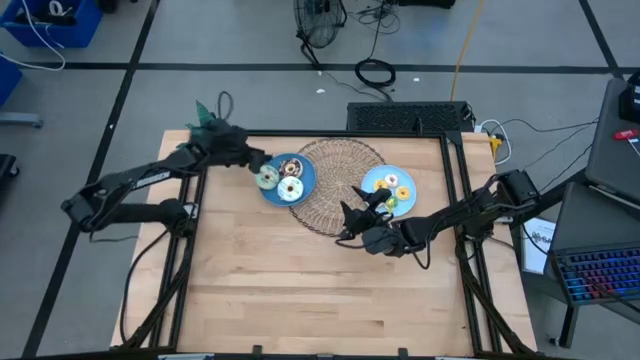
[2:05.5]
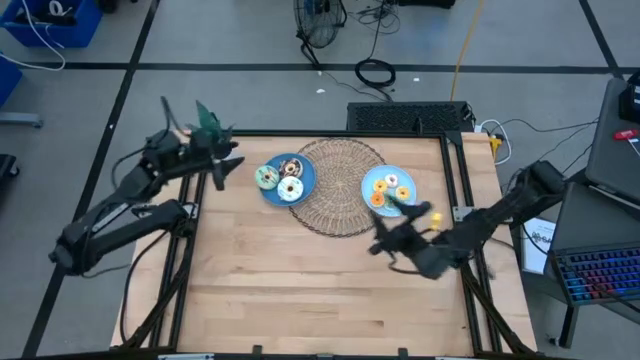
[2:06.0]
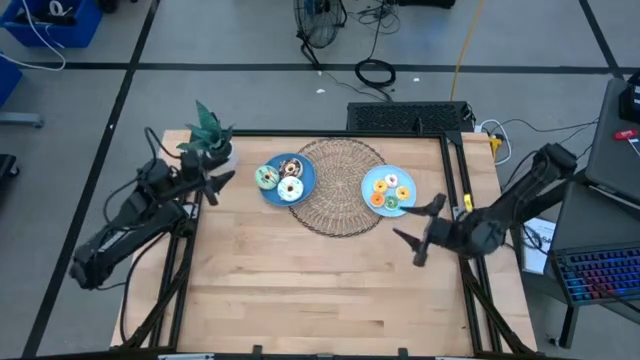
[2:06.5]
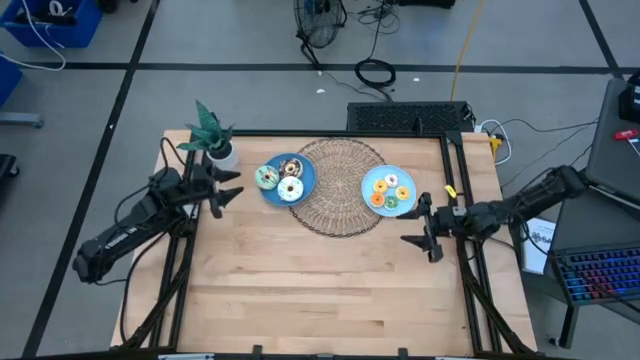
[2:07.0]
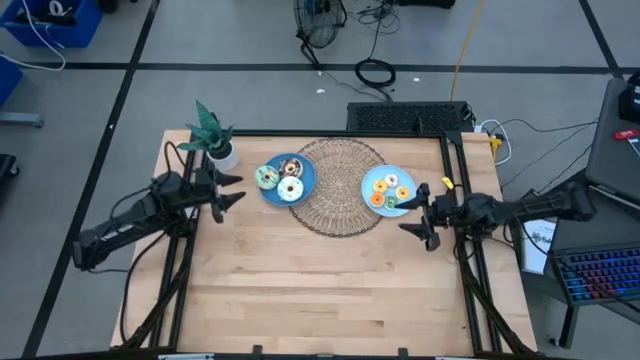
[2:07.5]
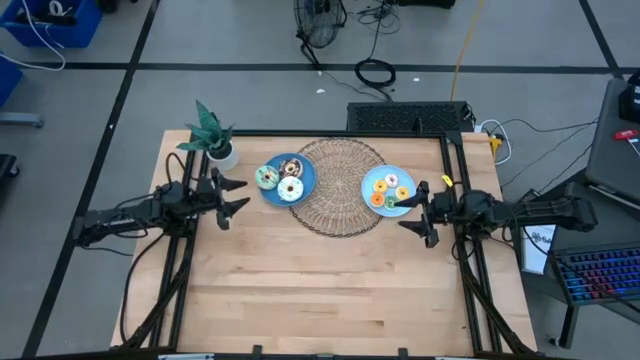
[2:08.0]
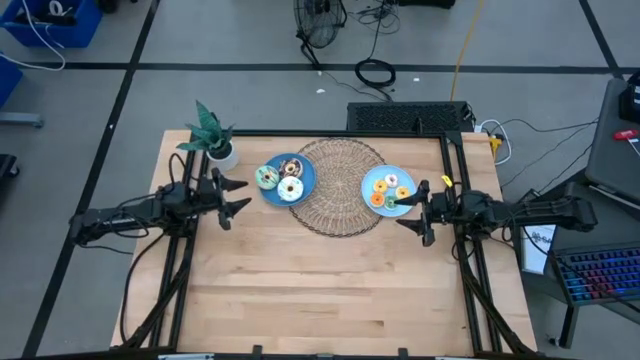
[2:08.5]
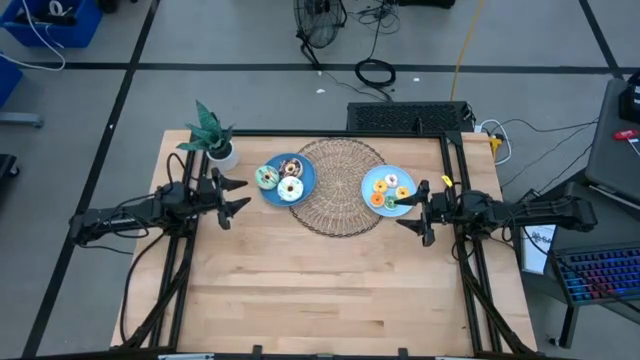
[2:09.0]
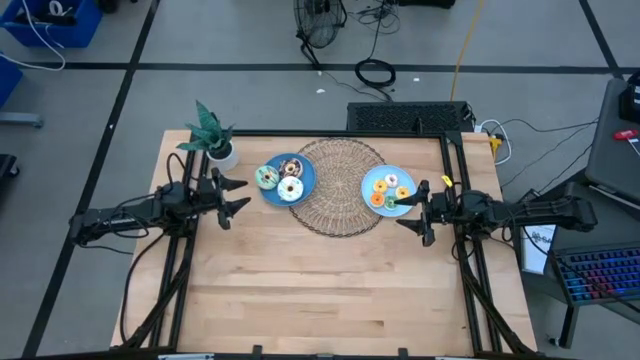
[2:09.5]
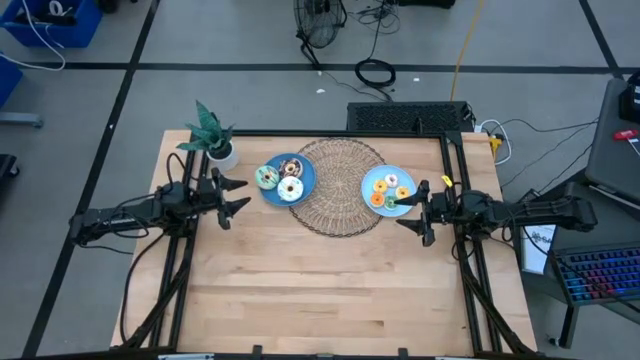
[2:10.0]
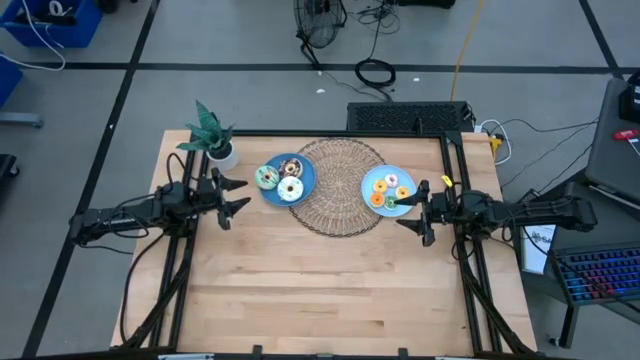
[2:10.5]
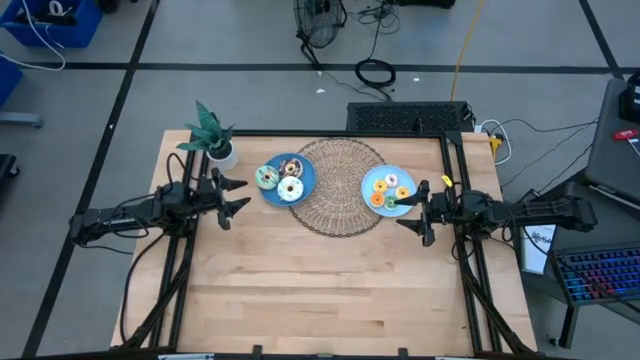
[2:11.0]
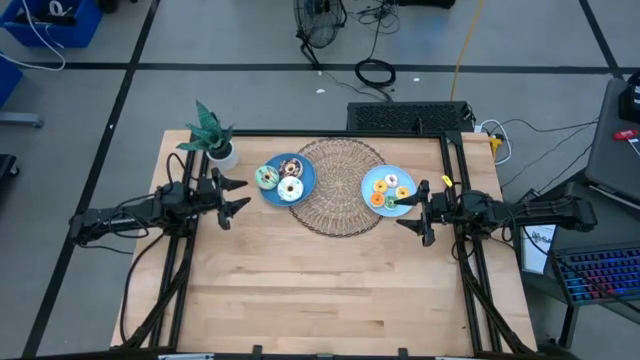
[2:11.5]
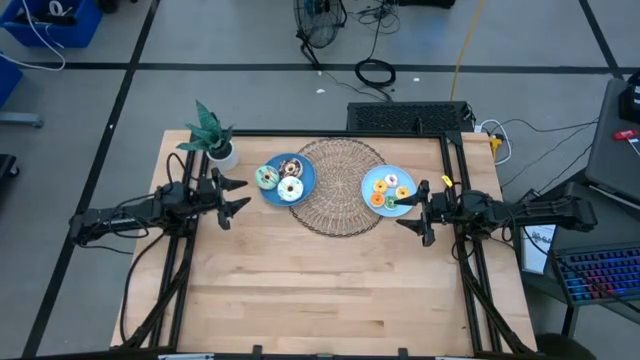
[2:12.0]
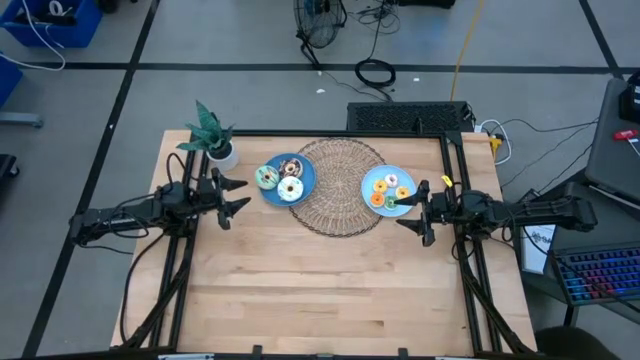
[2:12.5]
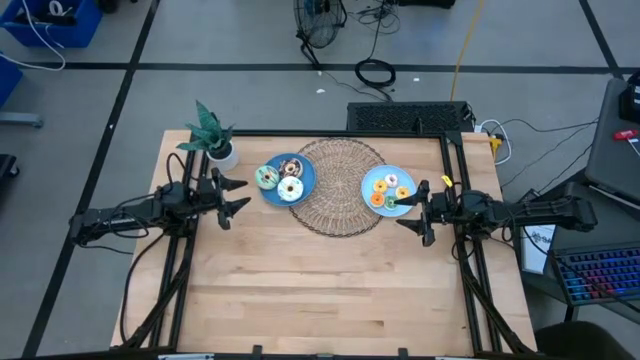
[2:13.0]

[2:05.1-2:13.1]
Task: Pick & Place donuts
Return to Home Position

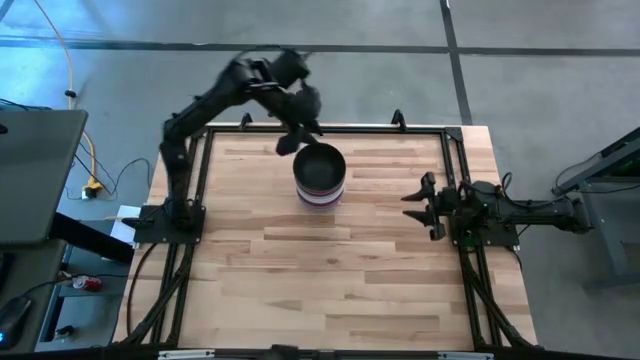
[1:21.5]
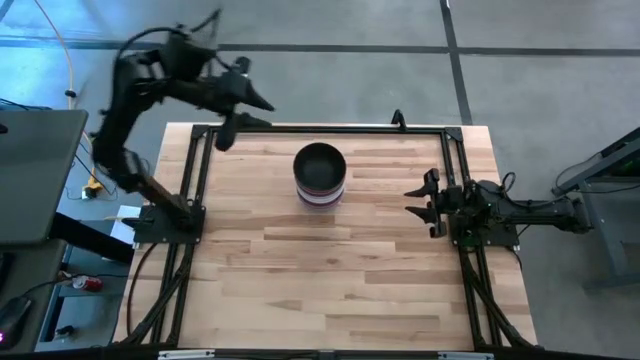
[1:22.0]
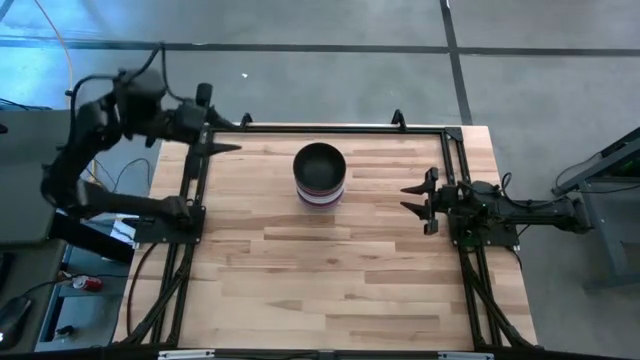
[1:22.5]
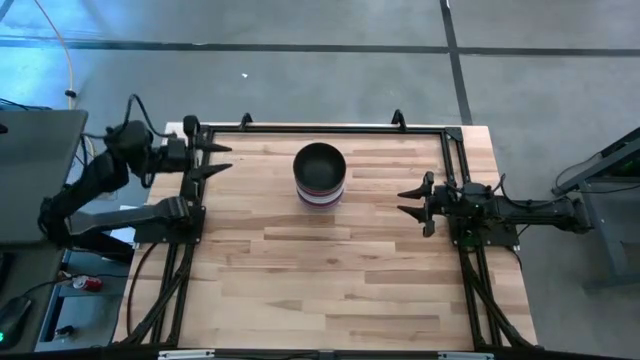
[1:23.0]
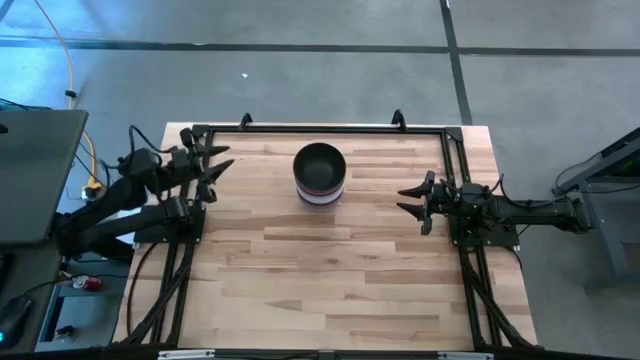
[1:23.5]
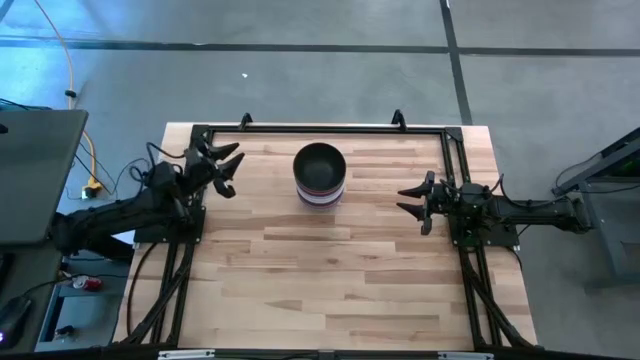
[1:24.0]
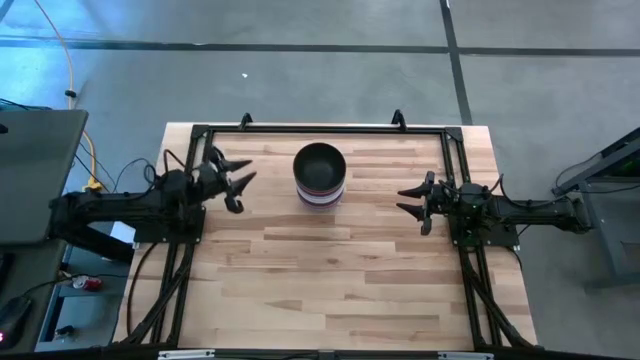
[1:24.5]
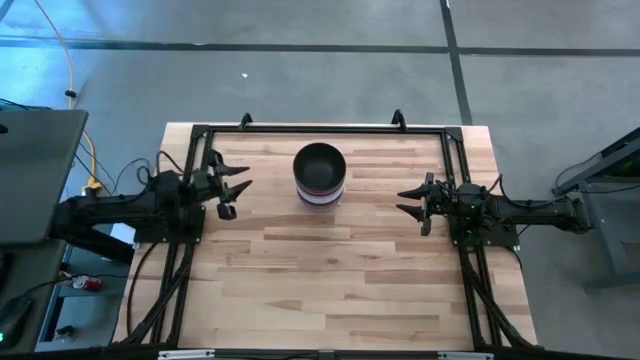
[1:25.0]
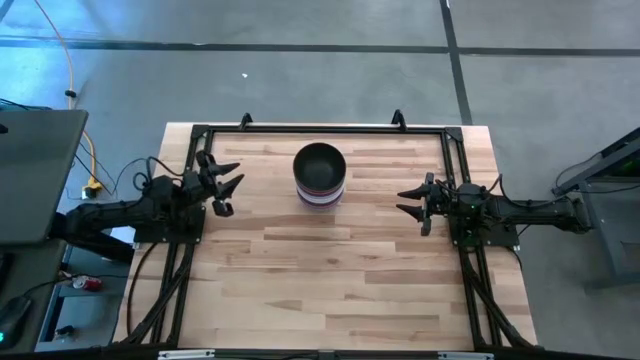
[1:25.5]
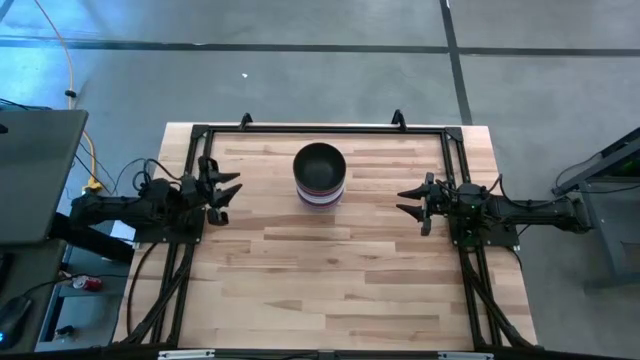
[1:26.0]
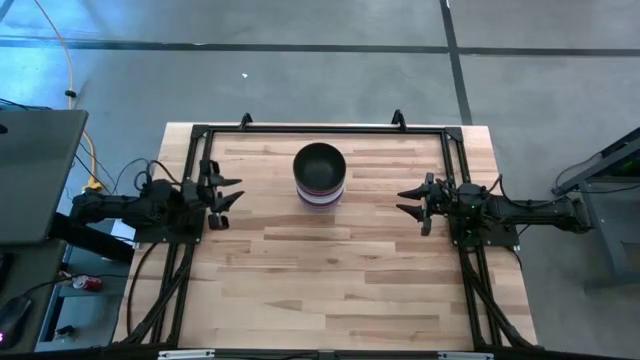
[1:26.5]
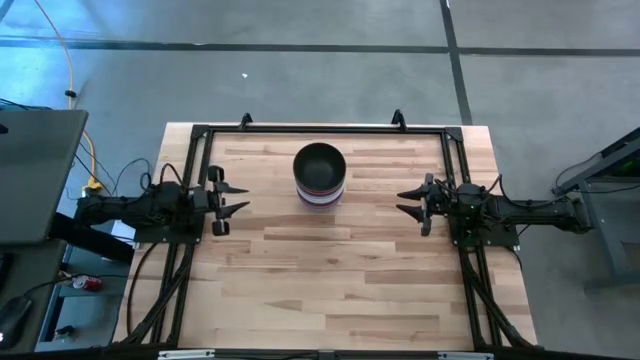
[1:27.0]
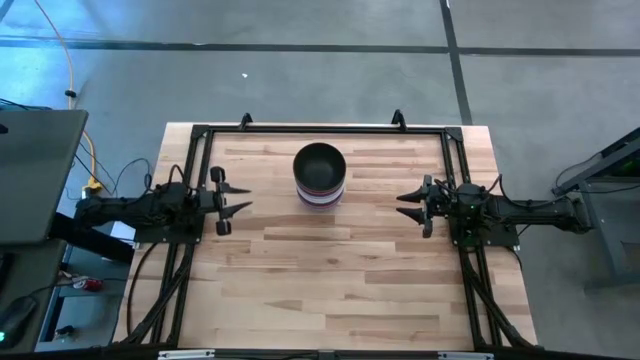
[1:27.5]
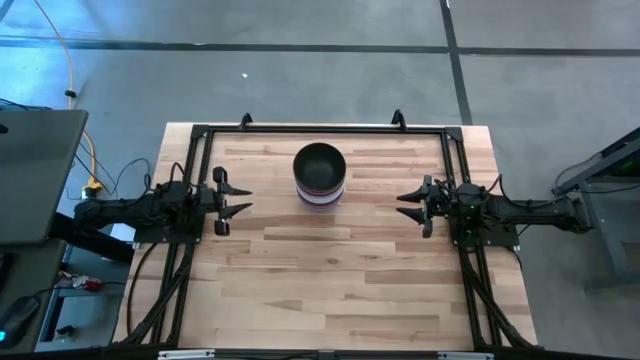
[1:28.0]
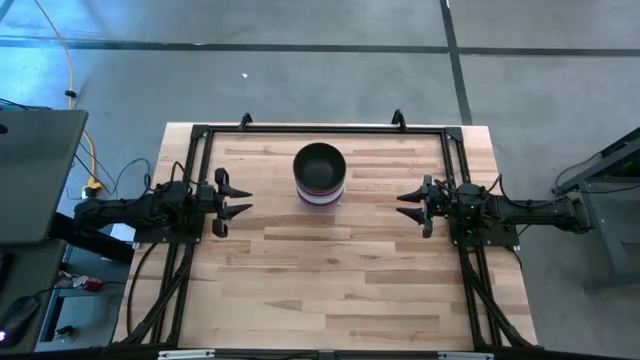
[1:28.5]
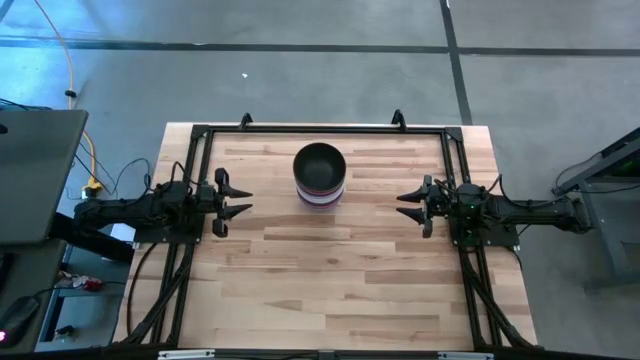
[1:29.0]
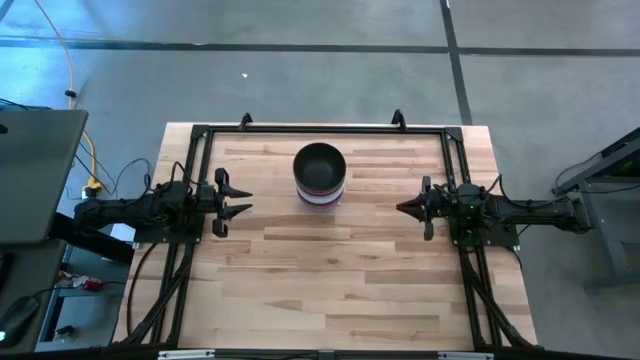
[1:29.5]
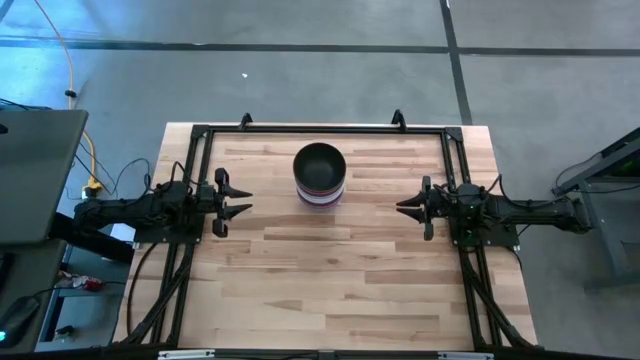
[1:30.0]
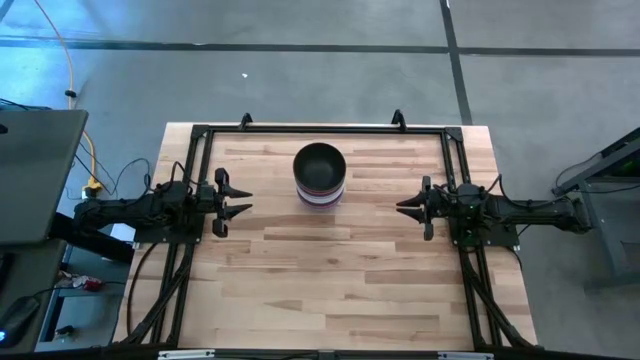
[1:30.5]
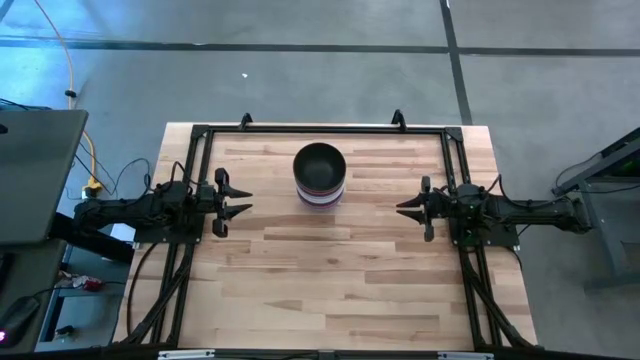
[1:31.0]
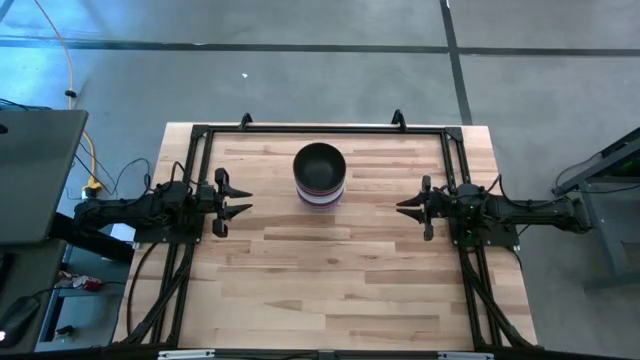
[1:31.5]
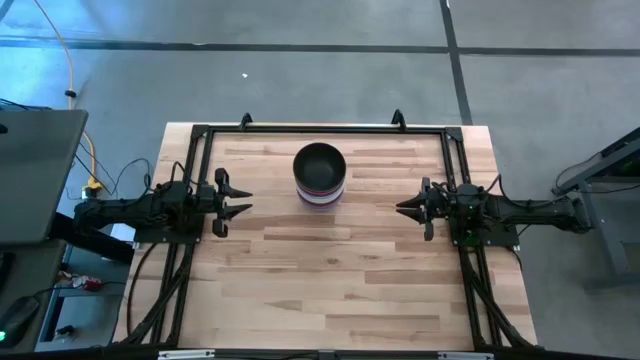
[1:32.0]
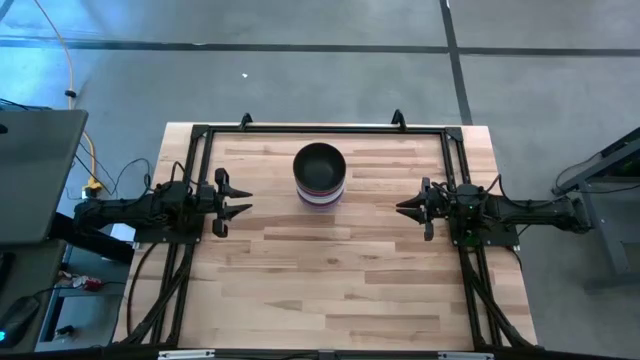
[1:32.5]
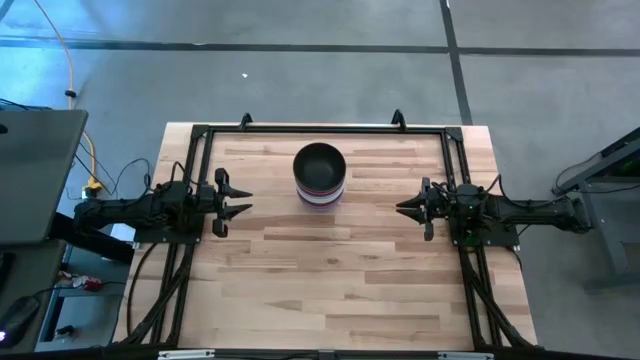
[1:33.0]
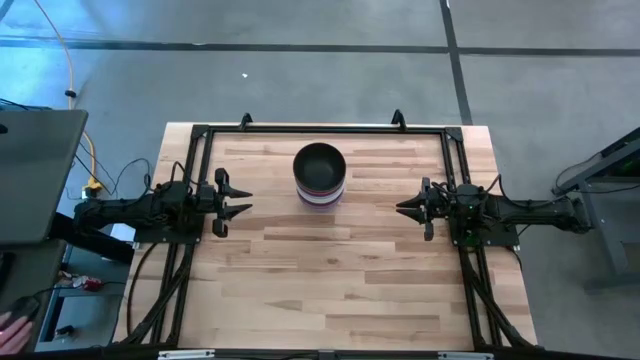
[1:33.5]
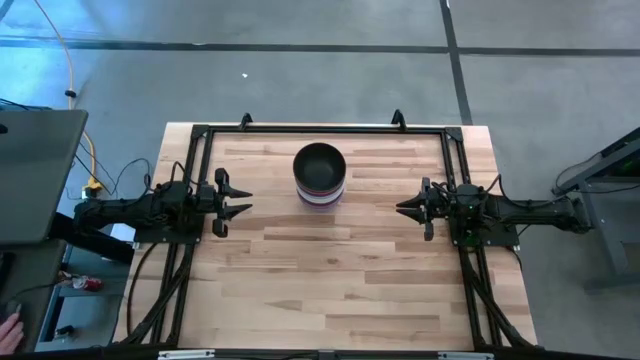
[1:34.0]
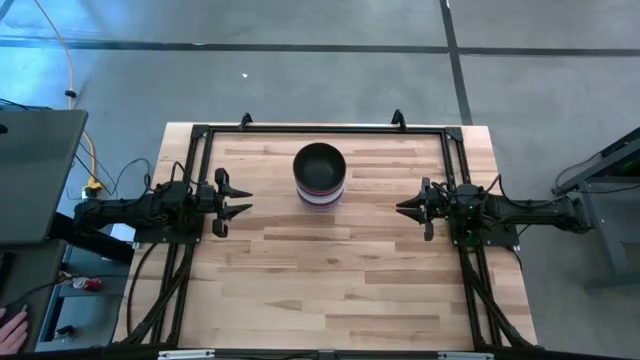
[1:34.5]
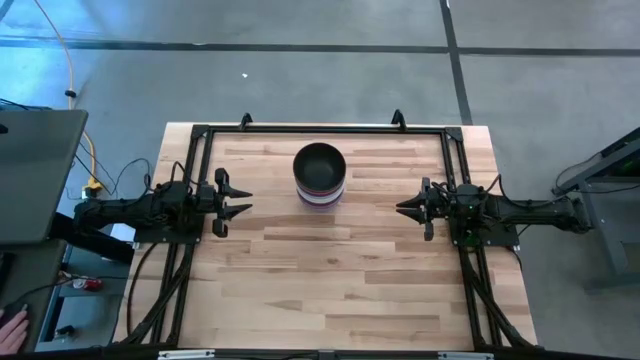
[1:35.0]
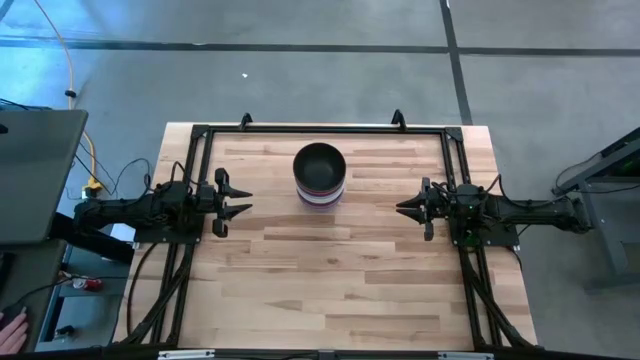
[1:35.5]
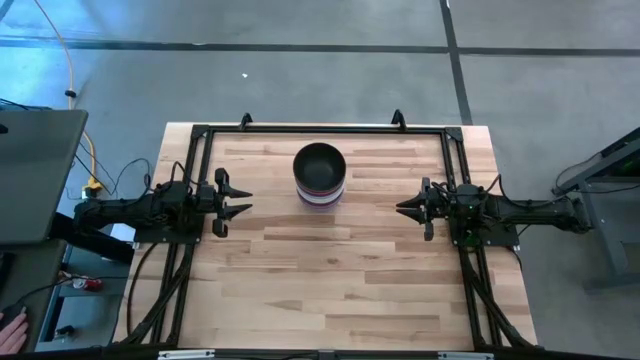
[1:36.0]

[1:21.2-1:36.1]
Task: Nest bowls inside each other
Return to Home Position
